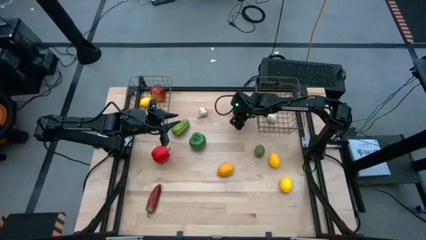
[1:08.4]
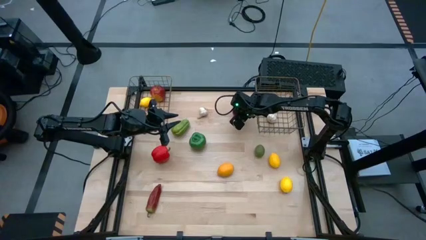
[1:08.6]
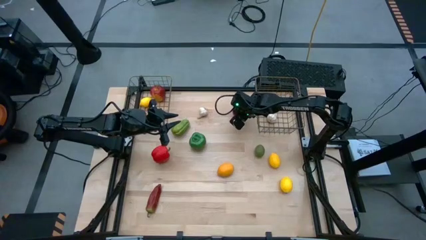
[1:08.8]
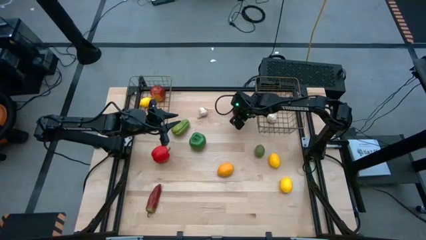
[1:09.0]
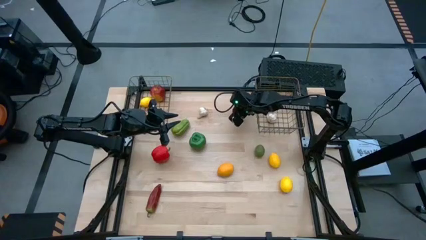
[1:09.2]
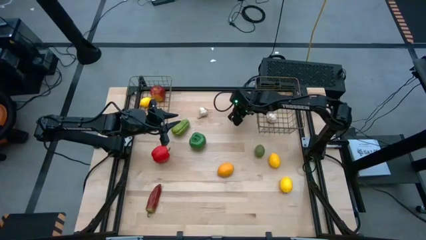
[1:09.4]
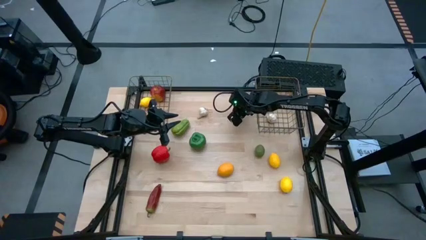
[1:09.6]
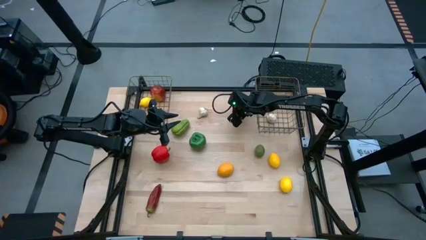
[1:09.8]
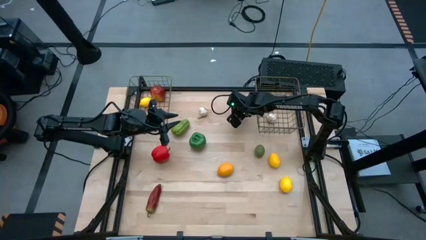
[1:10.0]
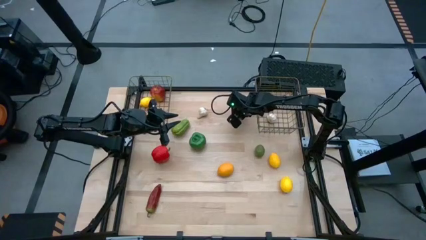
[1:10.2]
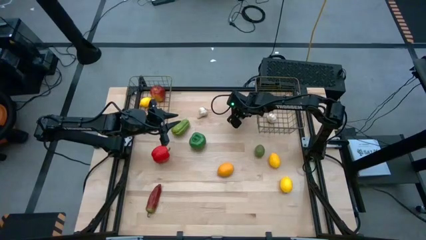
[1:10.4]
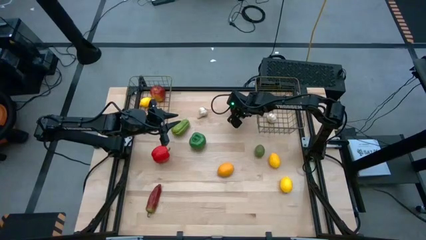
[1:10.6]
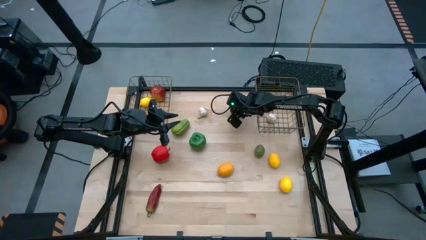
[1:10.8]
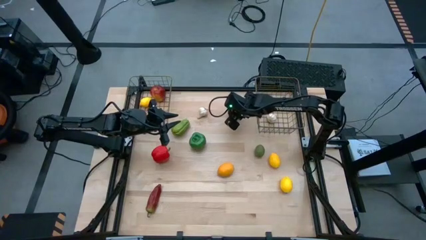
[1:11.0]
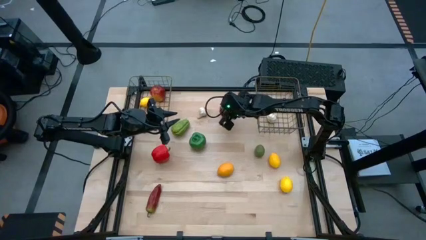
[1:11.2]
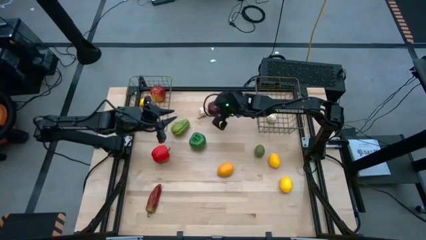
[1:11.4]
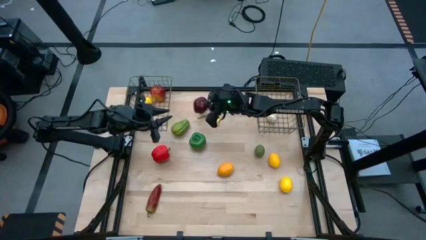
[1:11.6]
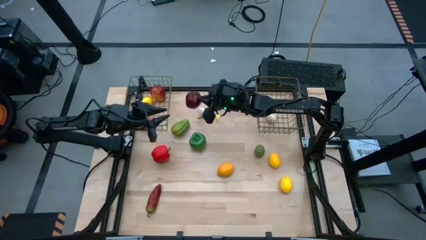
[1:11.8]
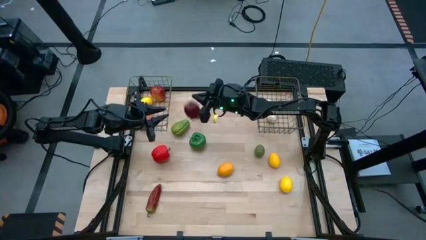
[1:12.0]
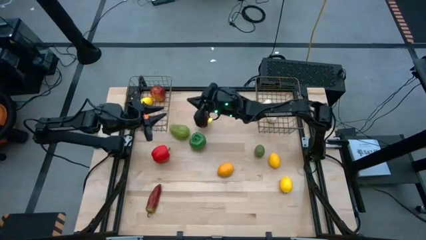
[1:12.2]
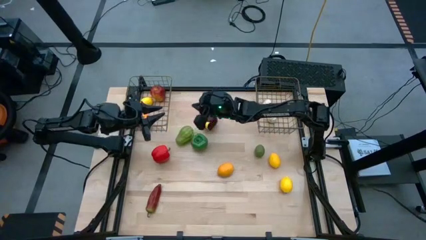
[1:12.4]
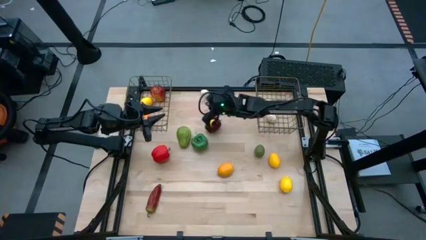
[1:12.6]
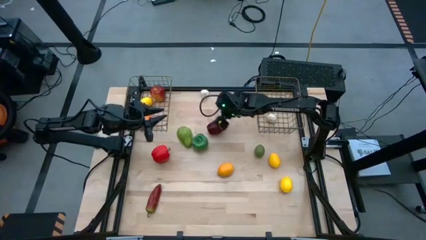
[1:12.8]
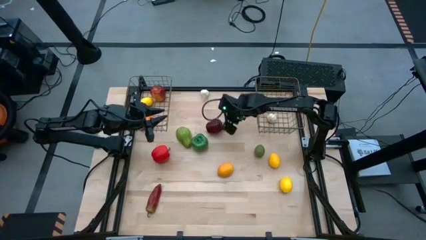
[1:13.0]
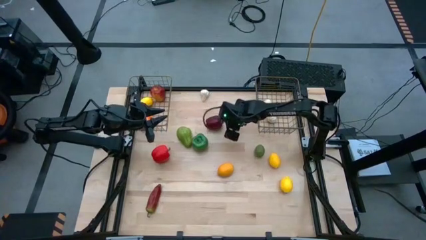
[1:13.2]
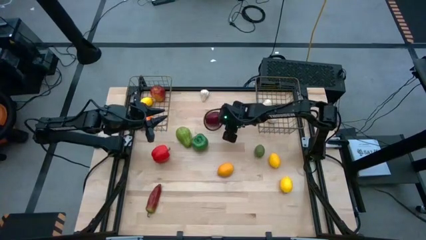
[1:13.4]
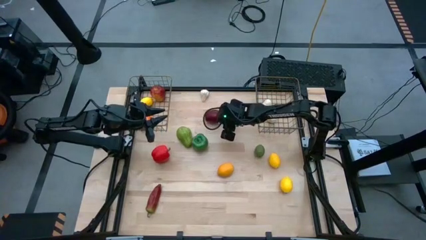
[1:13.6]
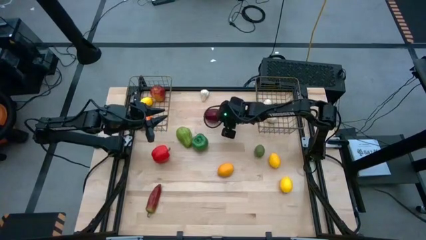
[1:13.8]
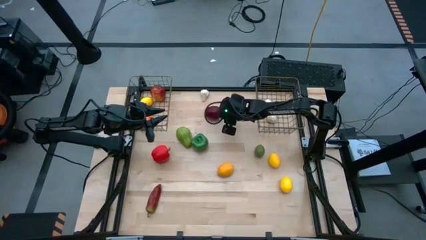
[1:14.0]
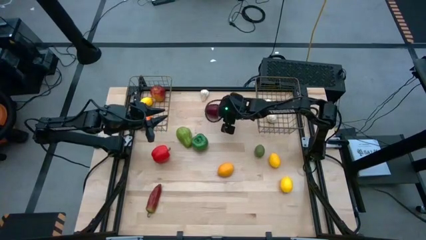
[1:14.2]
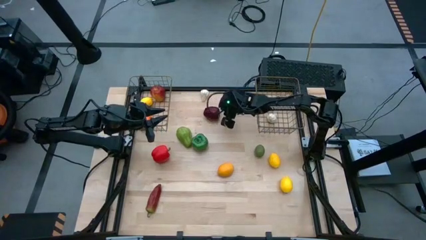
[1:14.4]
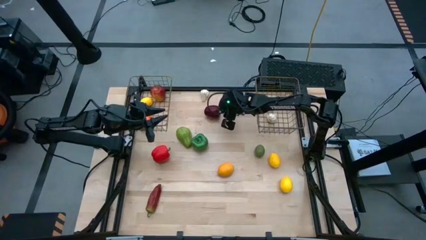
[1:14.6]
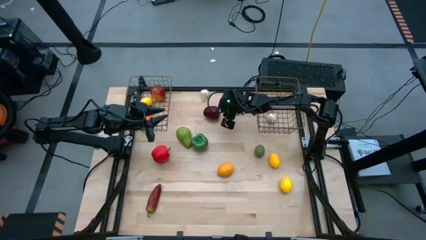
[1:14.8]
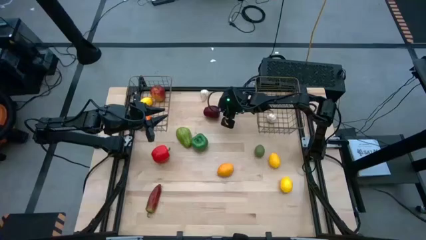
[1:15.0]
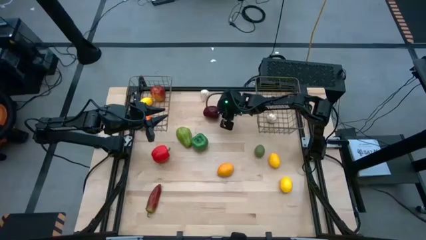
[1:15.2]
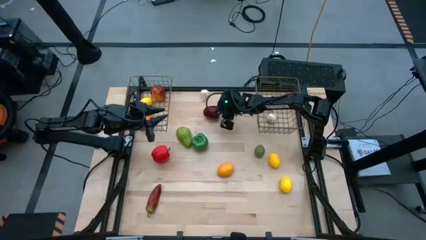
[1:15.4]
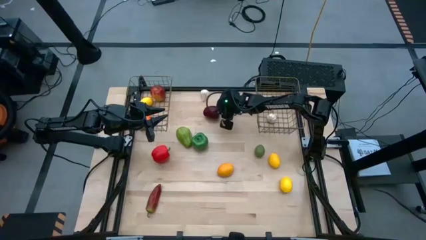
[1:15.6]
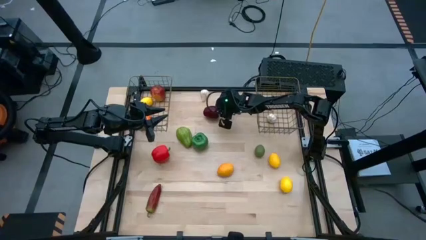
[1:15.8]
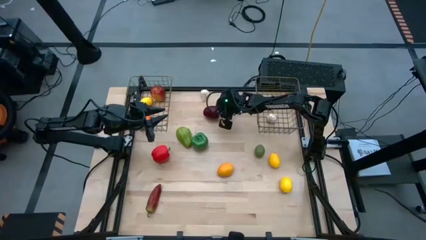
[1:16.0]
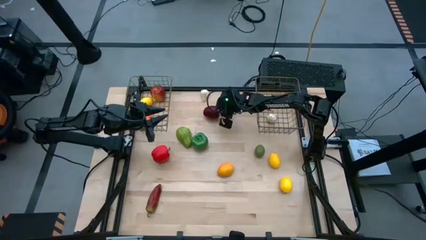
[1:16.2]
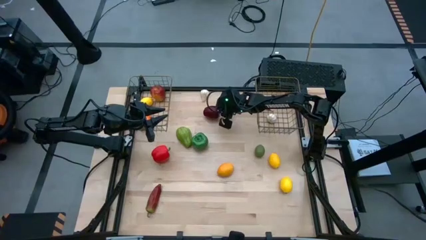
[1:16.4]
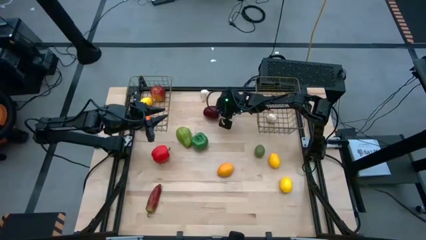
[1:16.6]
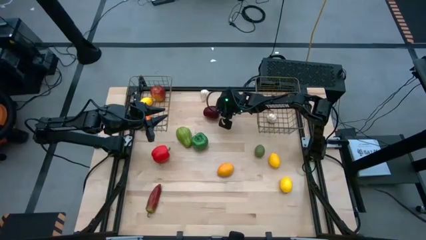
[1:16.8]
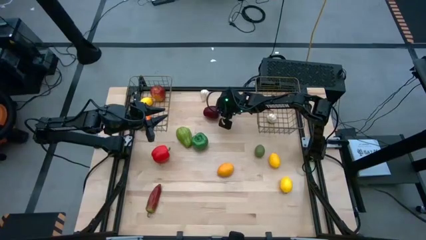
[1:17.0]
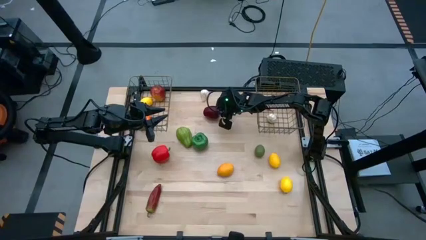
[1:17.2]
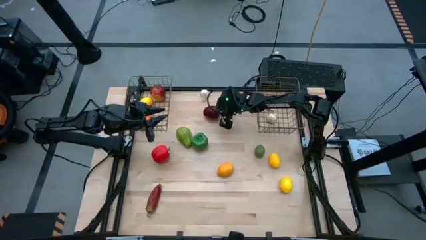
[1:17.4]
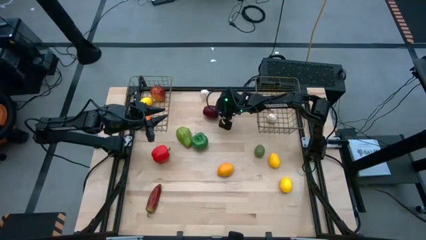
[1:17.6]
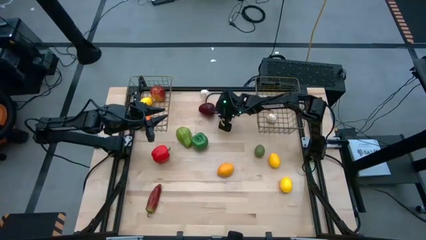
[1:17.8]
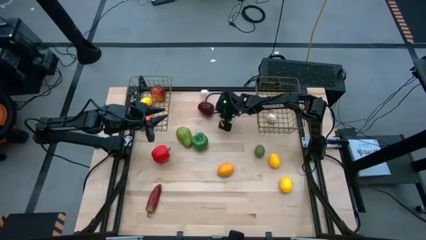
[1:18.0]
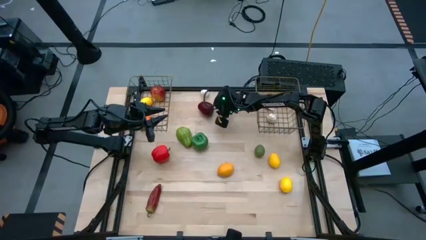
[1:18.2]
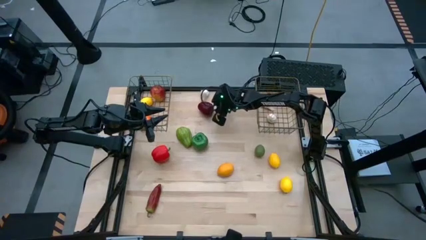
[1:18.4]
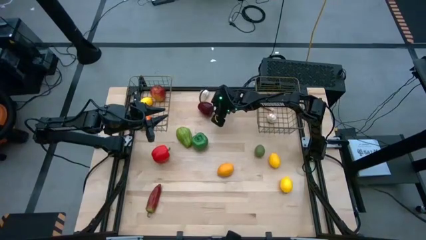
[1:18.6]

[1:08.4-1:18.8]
Task: Sort produce into baskets
Put the red apple into the left wire basket

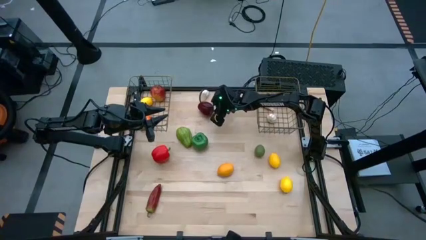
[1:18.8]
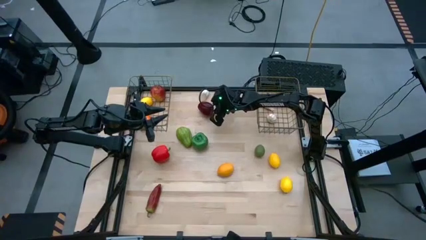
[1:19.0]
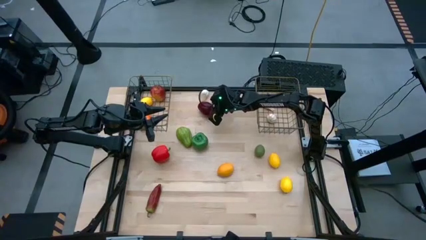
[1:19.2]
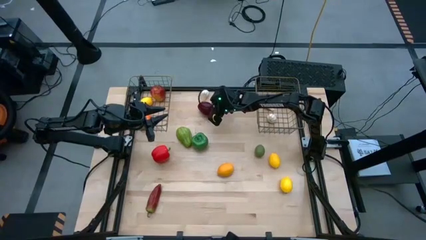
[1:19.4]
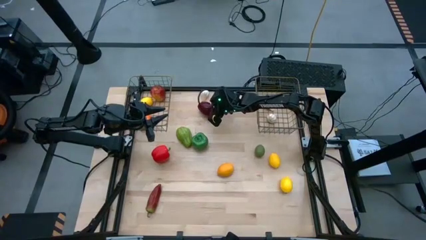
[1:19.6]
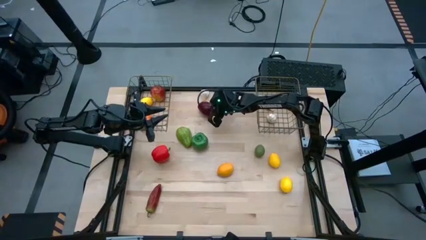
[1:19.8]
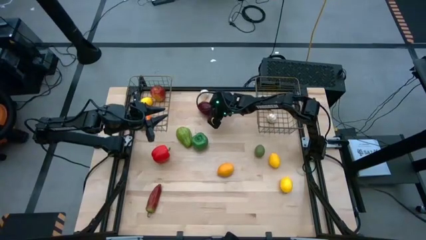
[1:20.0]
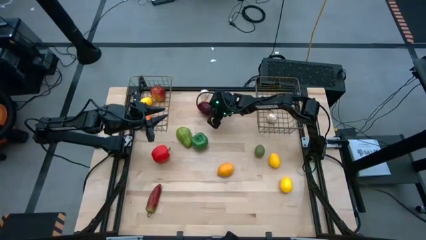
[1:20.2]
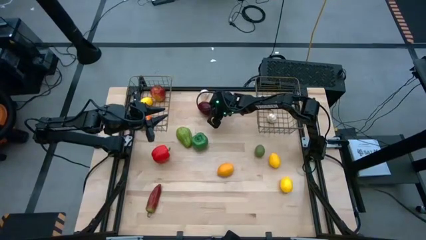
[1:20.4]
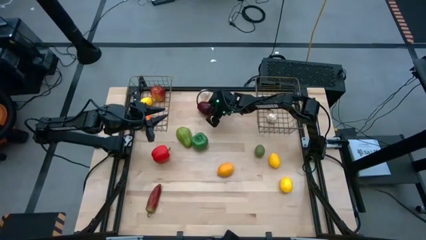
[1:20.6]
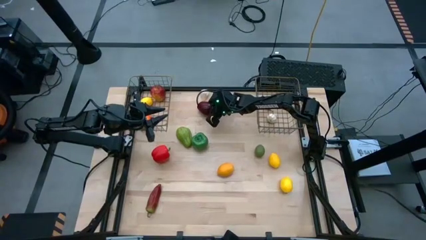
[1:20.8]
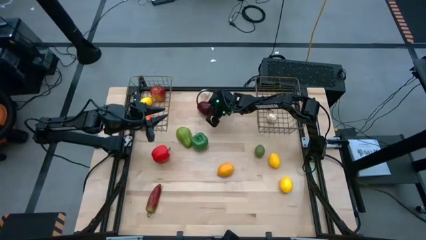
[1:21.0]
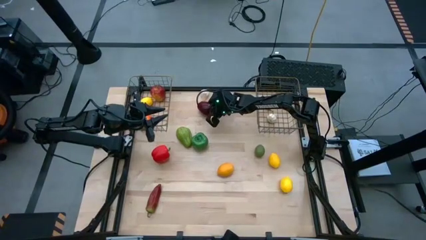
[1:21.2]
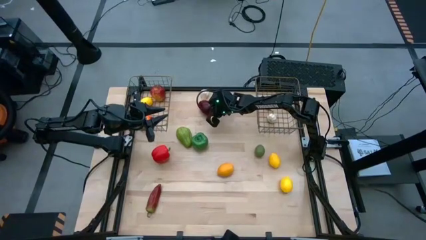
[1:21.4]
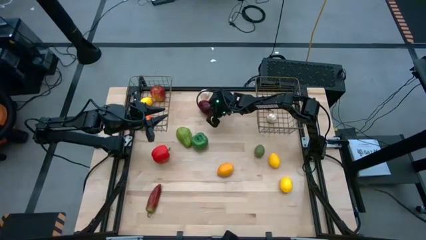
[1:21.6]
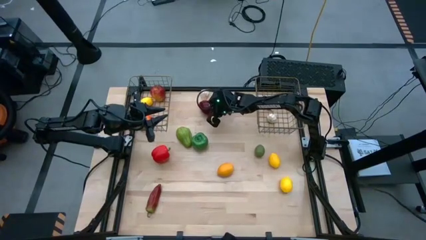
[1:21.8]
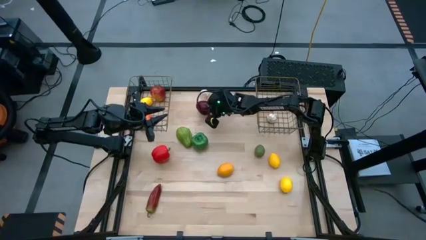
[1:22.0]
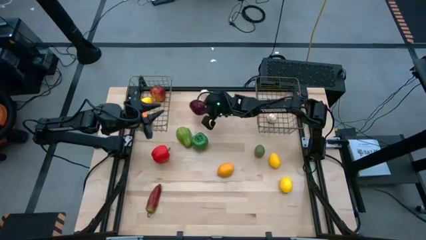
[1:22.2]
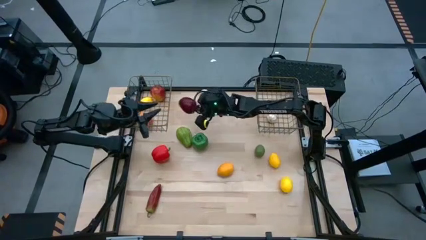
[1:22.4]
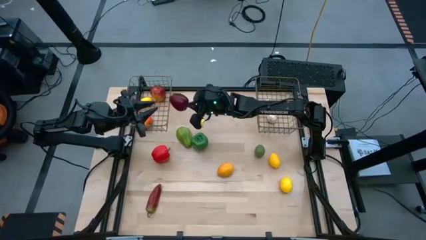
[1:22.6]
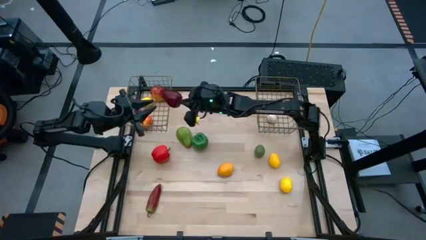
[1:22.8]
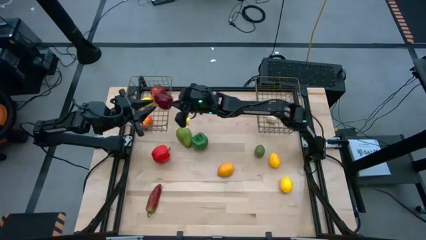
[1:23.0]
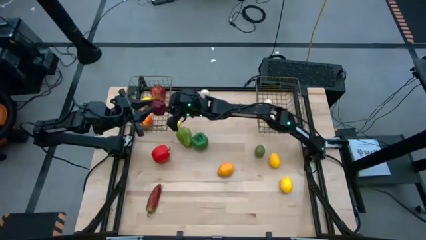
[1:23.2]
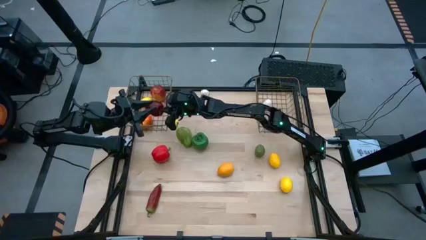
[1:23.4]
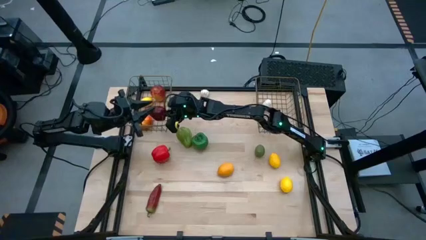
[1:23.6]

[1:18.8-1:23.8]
Put the red apple into the left wire basket
